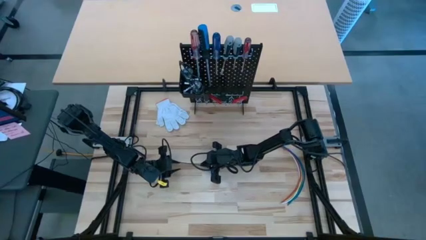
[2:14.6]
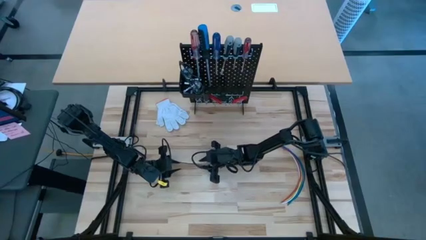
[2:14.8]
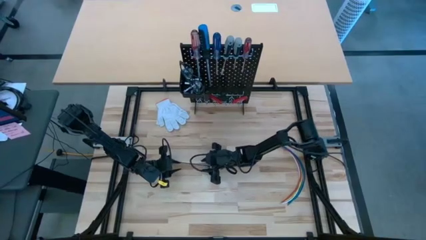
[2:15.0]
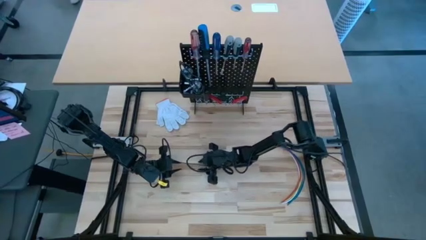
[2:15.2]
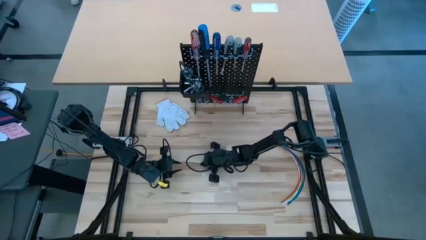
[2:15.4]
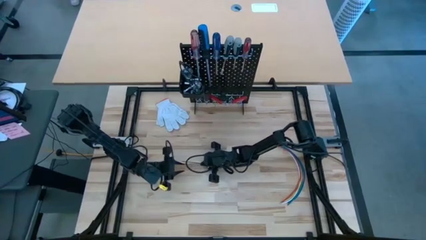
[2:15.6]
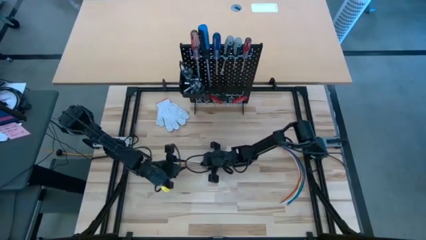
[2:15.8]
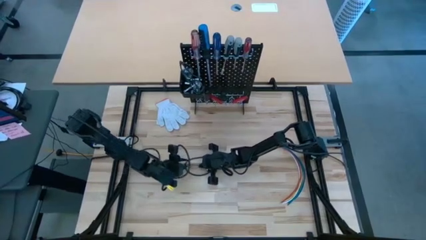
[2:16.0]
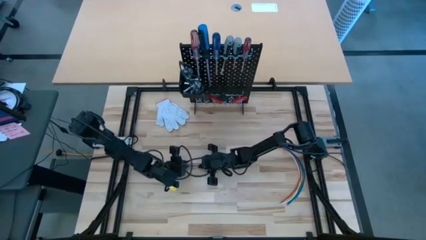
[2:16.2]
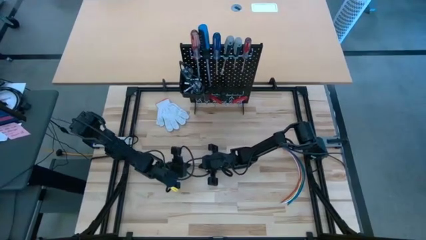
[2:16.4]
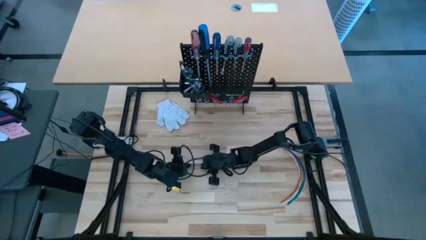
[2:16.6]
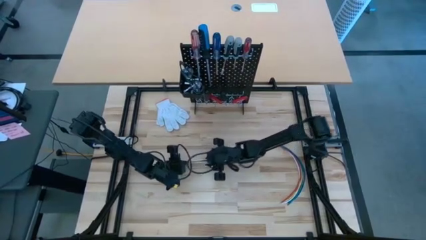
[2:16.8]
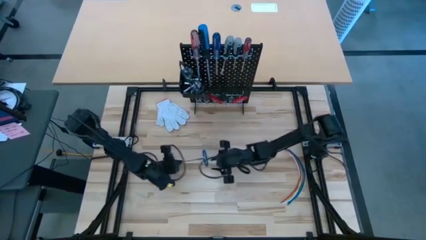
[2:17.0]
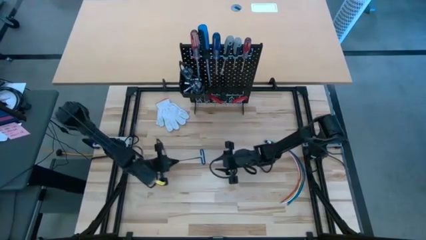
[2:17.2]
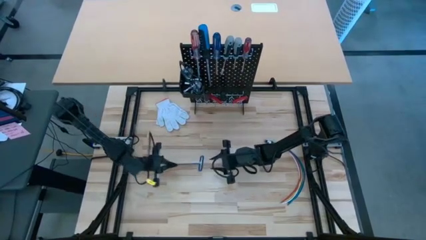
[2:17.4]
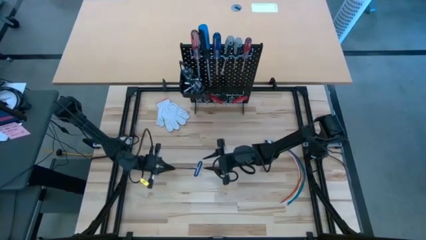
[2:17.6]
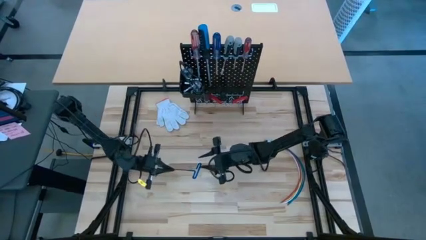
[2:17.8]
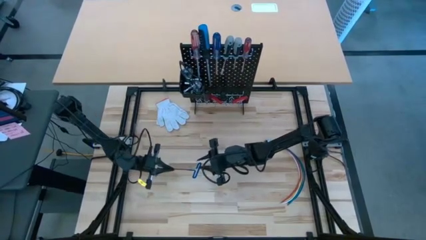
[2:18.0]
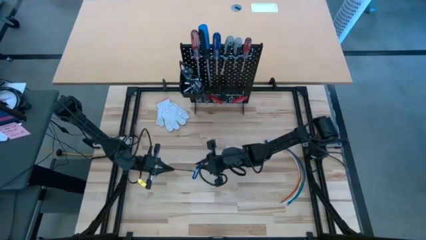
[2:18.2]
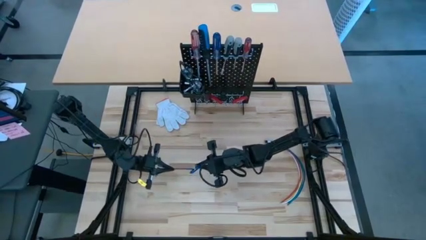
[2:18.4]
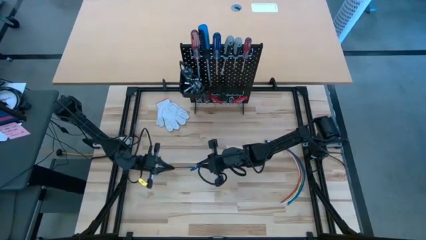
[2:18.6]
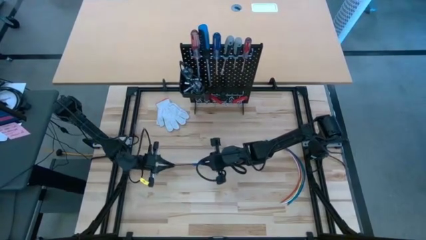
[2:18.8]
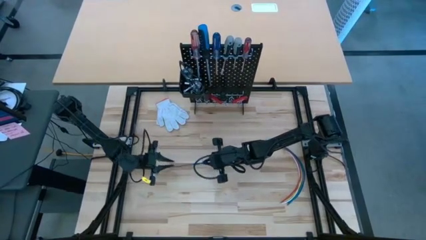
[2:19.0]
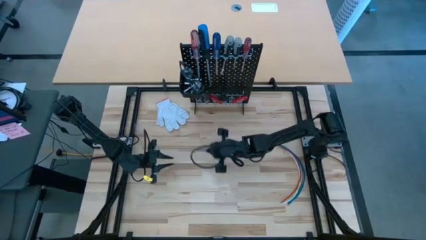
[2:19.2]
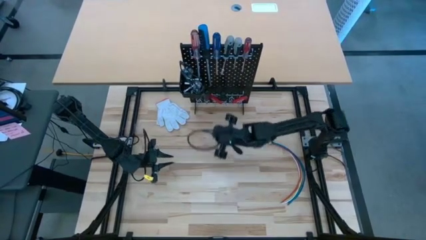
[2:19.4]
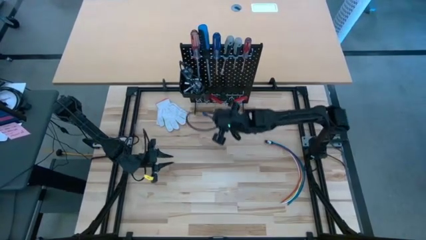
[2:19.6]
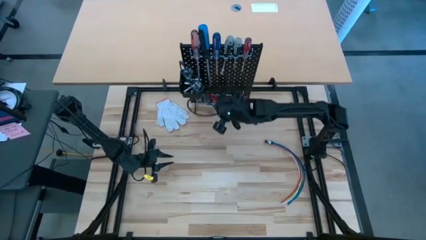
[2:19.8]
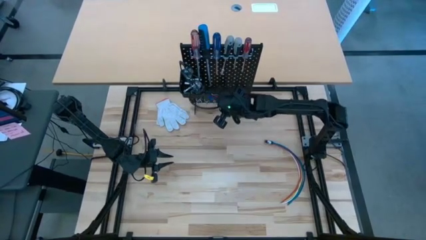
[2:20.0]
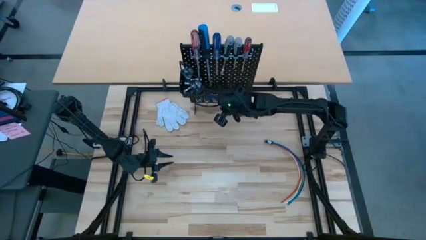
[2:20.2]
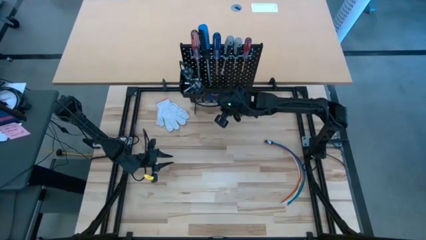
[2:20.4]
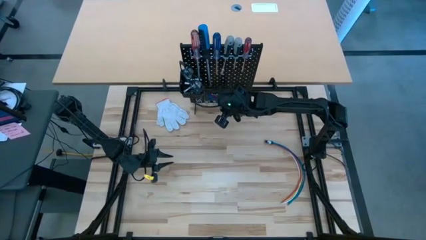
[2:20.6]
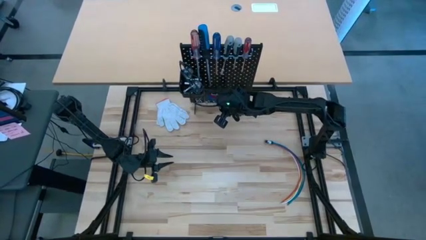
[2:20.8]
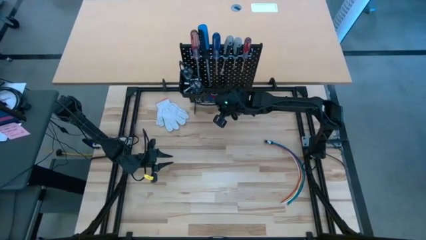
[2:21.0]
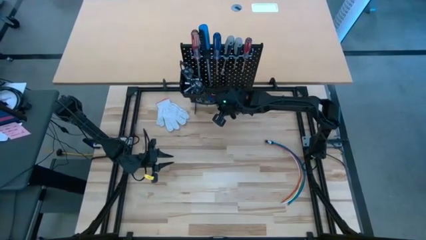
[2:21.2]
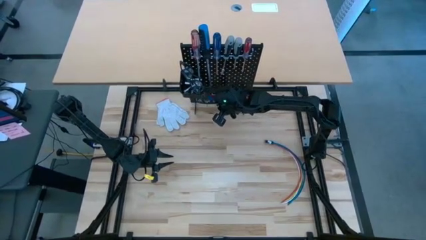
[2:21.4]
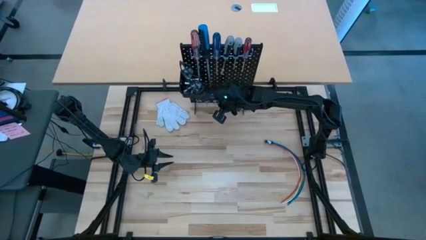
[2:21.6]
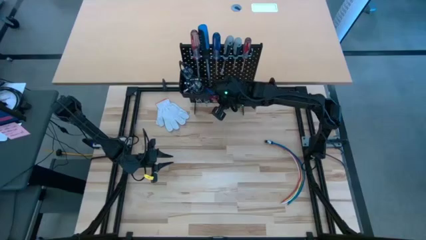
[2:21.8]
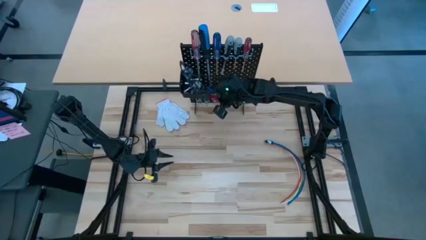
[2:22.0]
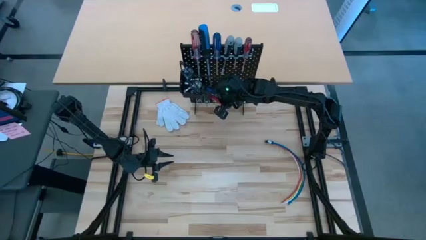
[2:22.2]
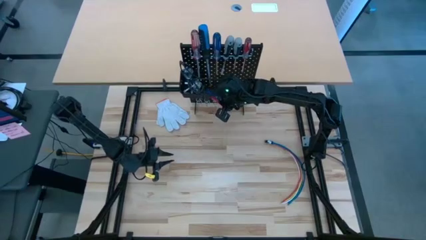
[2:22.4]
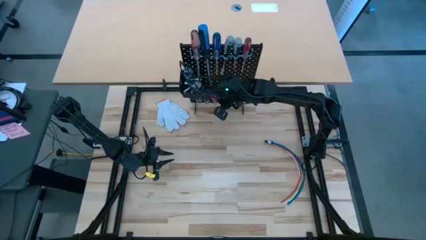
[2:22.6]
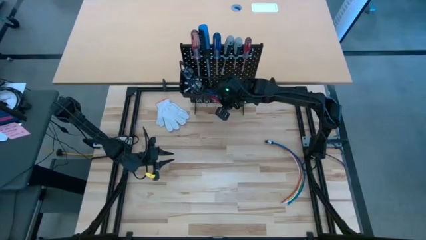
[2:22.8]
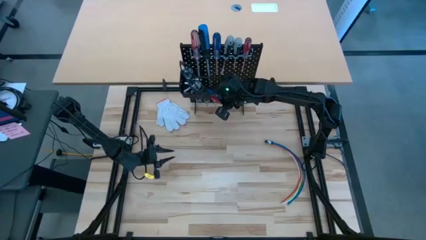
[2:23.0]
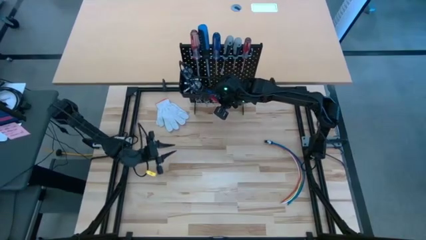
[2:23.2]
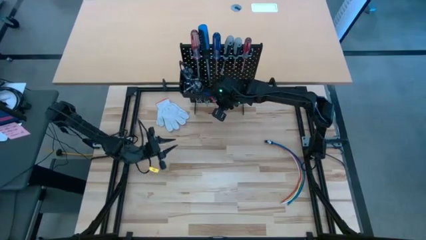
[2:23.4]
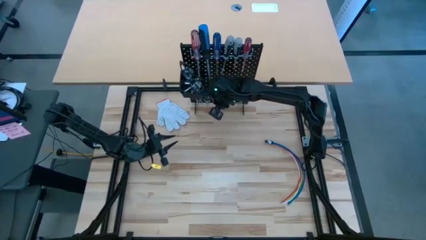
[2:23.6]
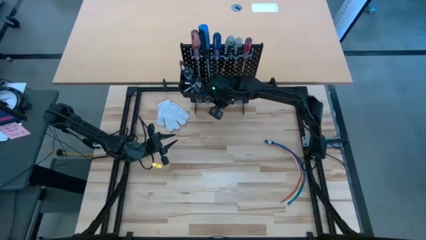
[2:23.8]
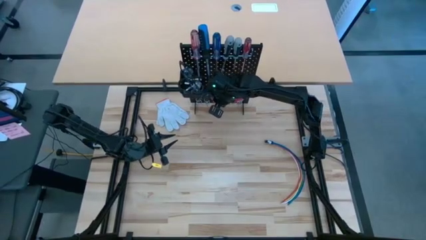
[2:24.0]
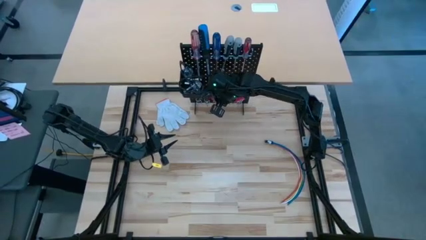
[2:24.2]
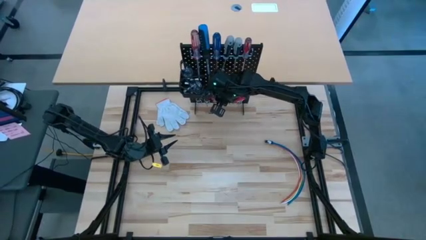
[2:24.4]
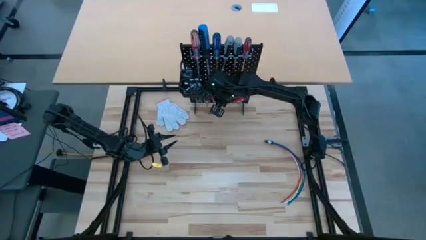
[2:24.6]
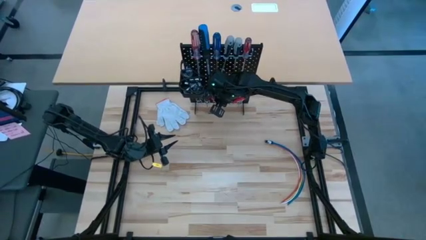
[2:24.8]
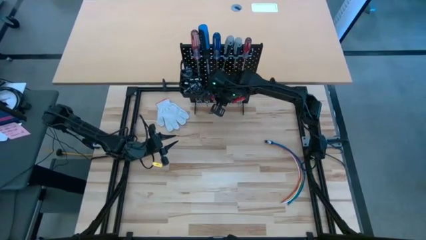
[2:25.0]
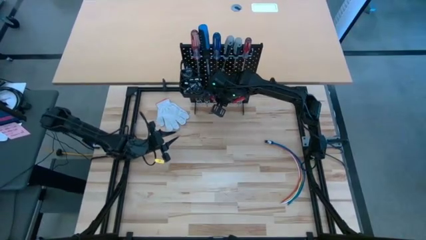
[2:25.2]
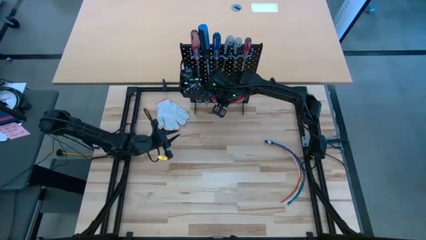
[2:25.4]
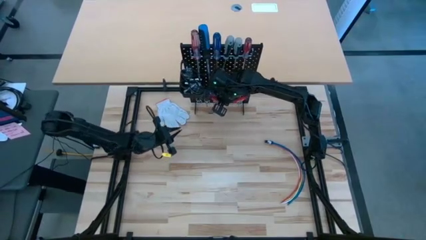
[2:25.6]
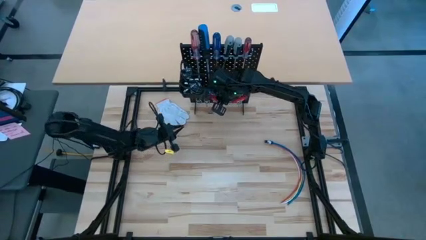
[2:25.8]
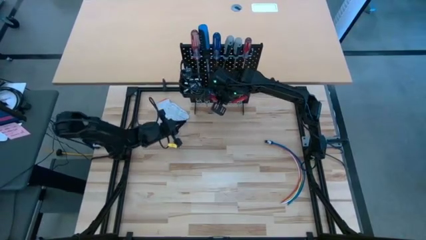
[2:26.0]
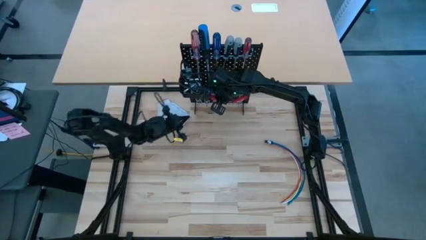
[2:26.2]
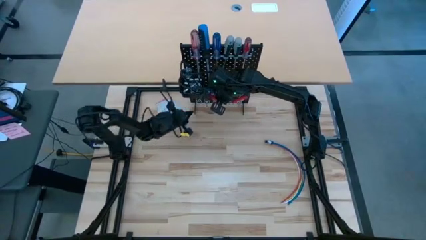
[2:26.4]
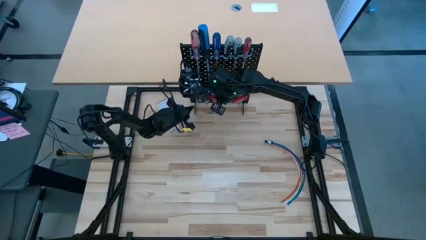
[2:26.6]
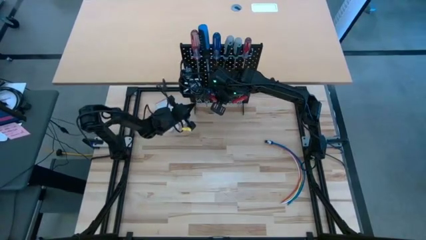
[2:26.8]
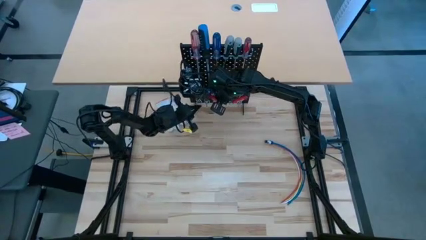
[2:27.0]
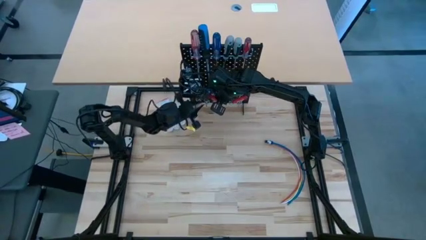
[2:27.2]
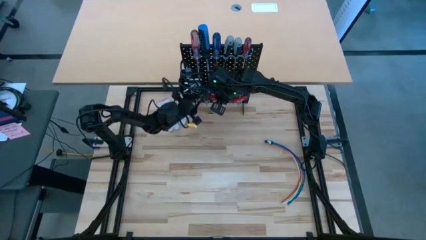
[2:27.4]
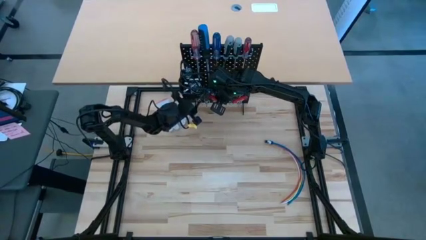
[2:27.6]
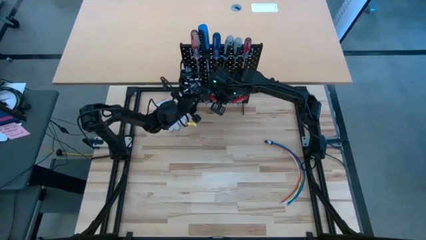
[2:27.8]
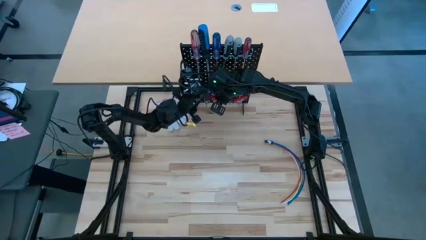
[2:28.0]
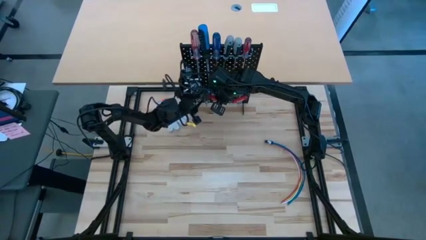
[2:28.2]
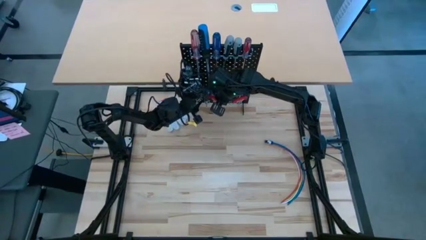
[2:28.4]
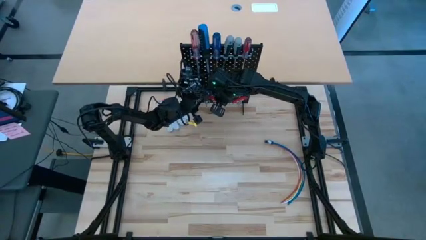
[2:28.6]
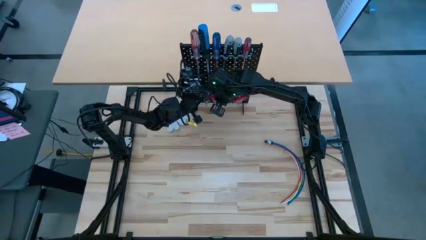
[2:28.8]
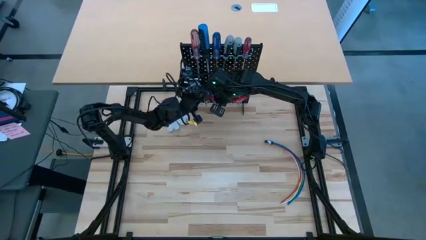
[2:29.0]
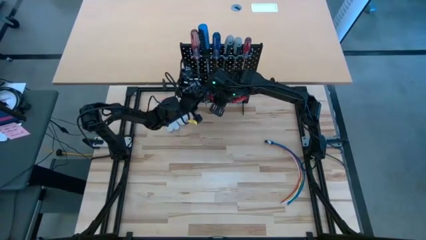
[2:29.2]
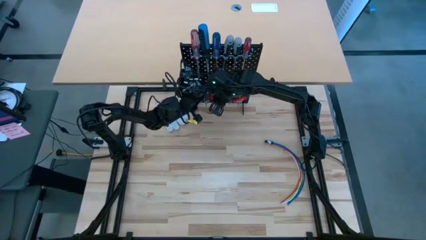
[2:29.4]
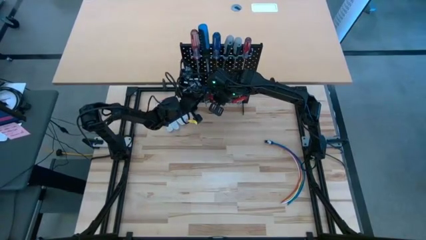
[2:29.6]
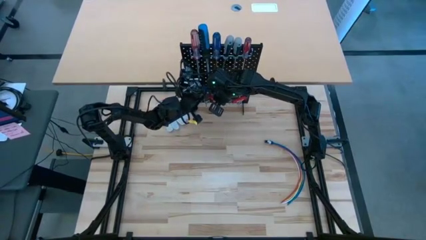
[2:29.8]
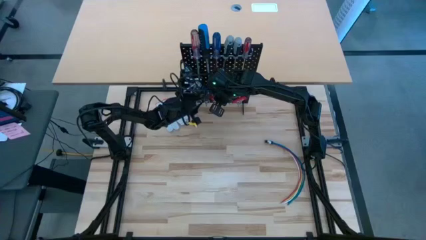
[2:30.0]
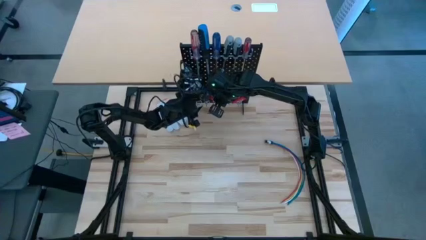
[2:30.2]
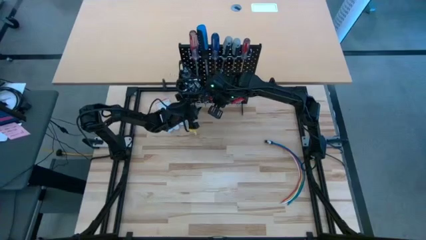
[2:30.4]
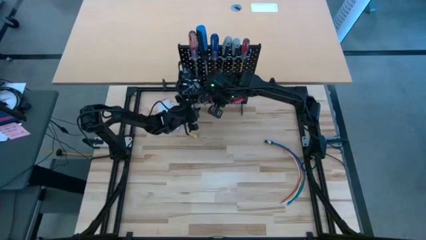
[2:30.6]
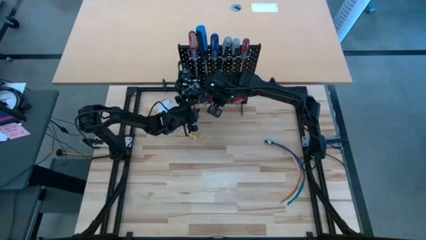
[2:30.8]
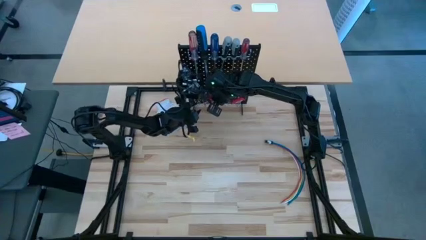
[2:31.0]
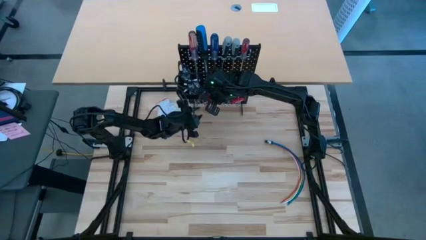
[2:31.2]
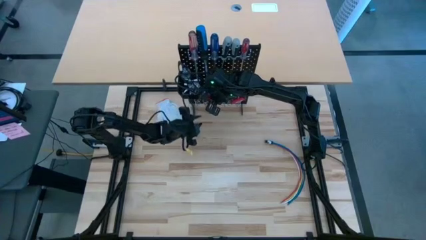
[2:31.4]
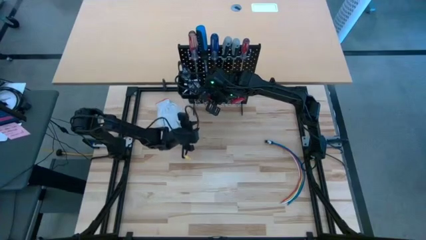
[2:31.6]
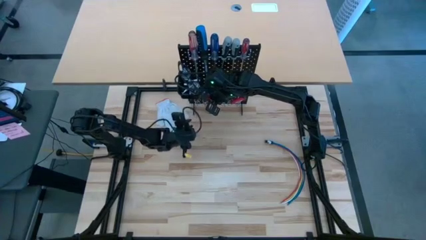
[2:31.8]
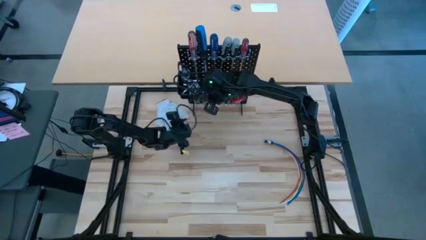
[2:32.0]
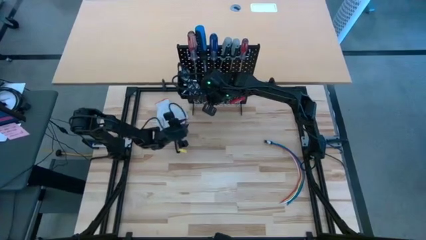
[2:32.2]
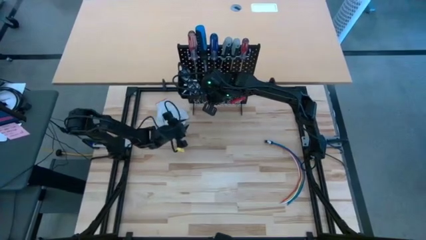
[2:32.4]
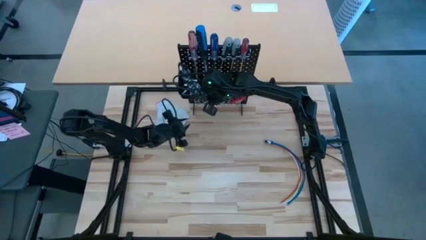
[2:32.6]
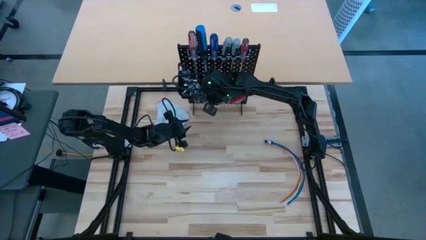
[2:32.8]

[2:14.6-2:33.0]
Task: Hang tools onto peg board
Hang the blue pick tool on the peg board
